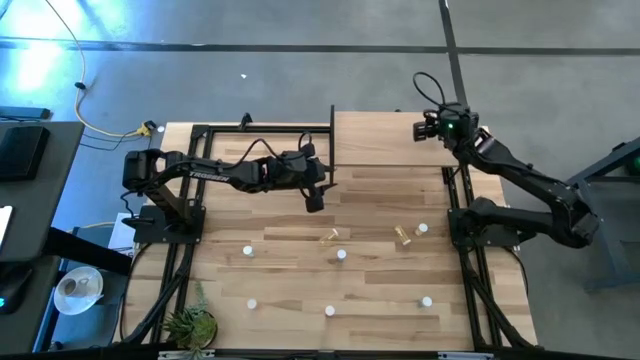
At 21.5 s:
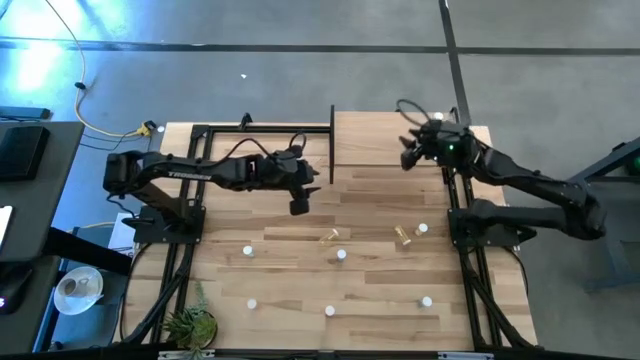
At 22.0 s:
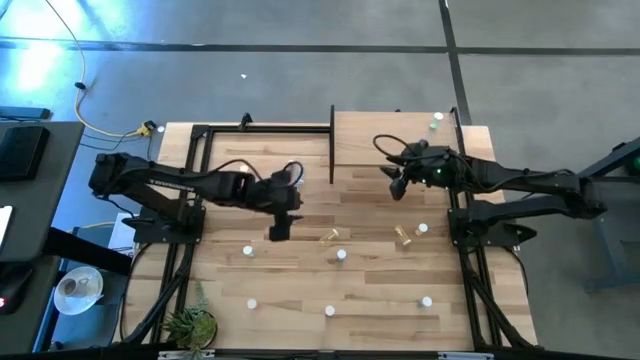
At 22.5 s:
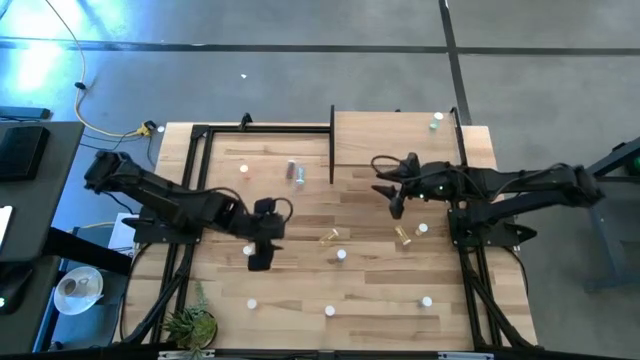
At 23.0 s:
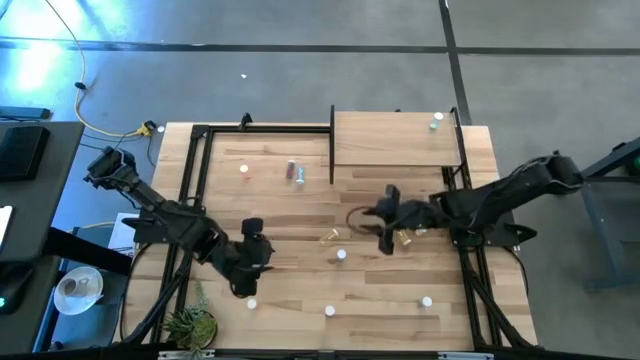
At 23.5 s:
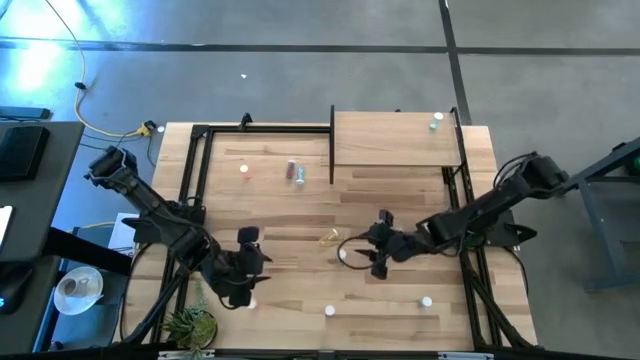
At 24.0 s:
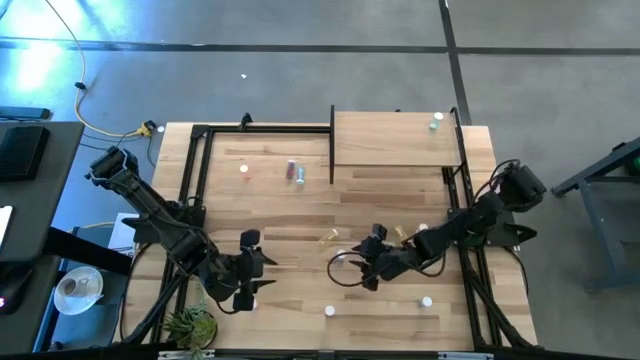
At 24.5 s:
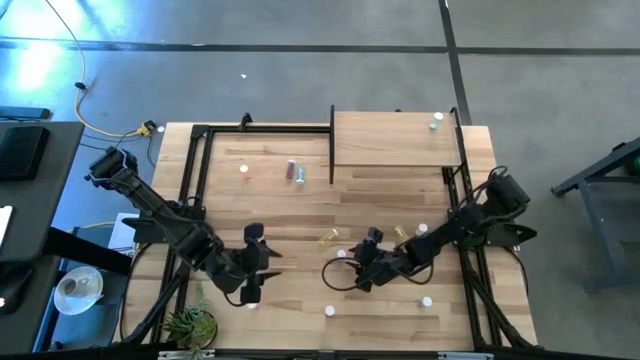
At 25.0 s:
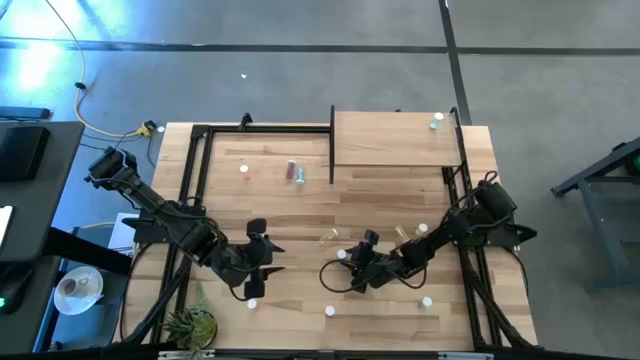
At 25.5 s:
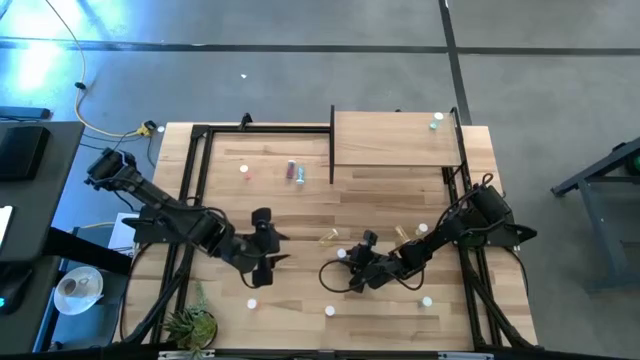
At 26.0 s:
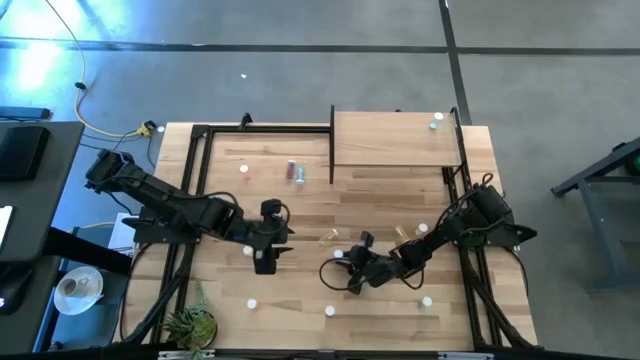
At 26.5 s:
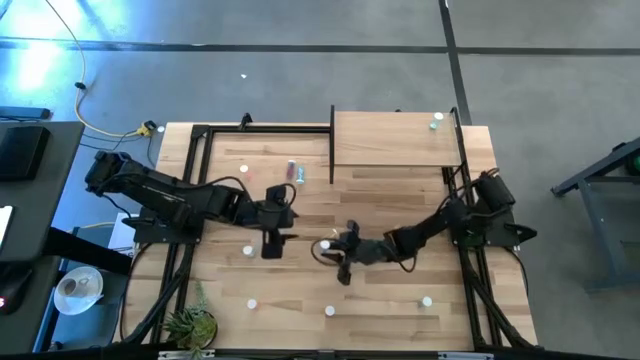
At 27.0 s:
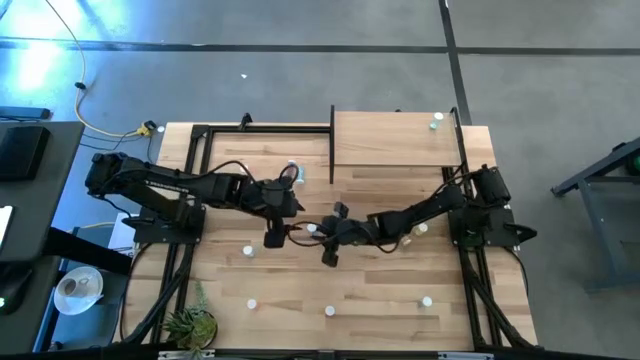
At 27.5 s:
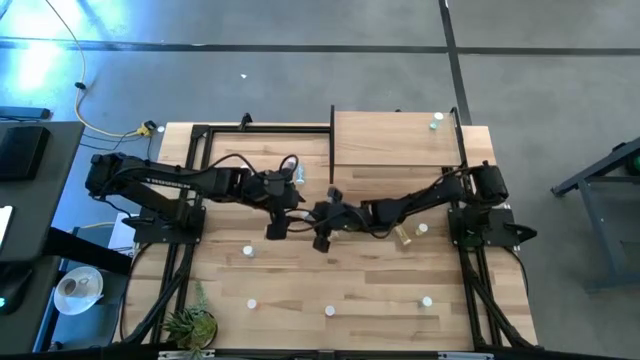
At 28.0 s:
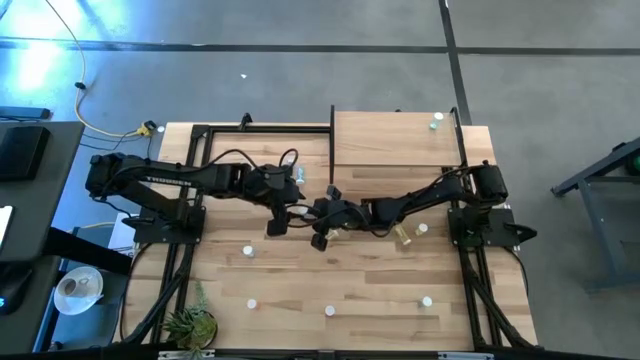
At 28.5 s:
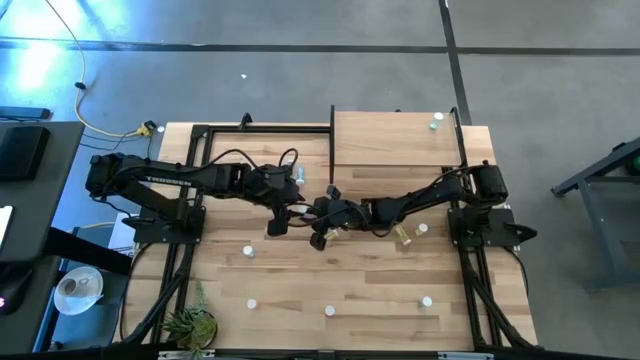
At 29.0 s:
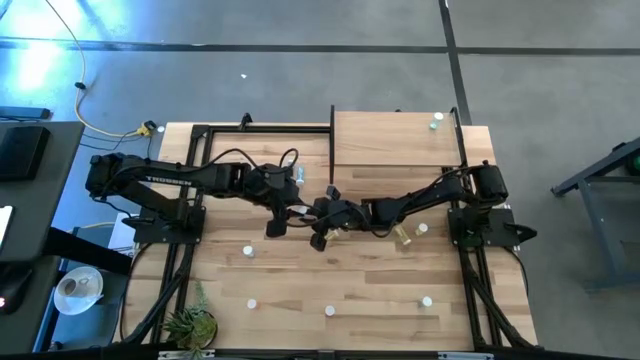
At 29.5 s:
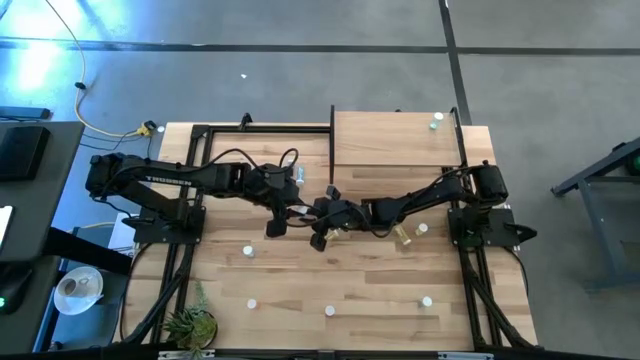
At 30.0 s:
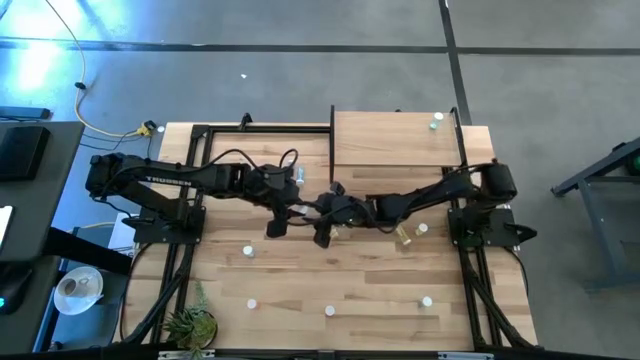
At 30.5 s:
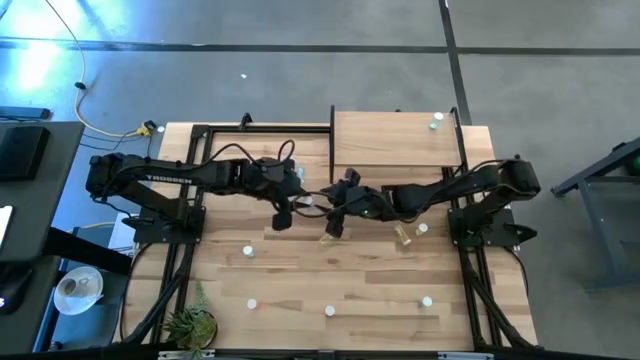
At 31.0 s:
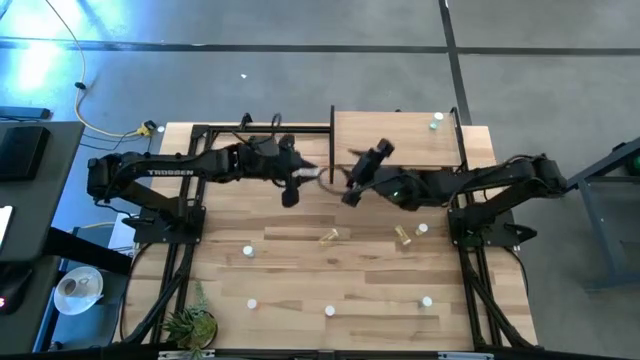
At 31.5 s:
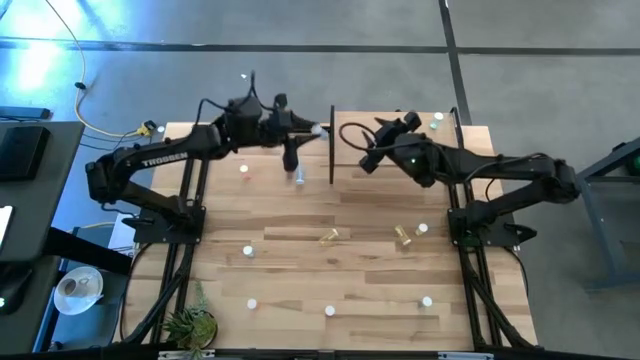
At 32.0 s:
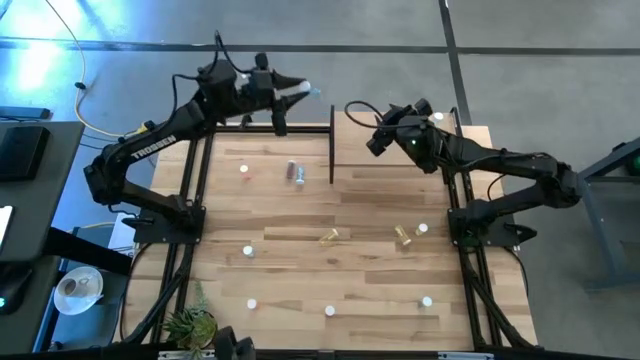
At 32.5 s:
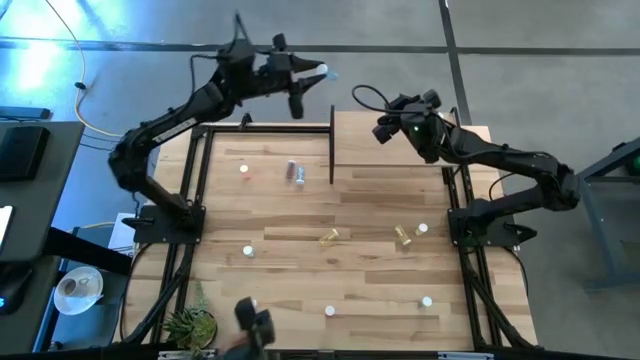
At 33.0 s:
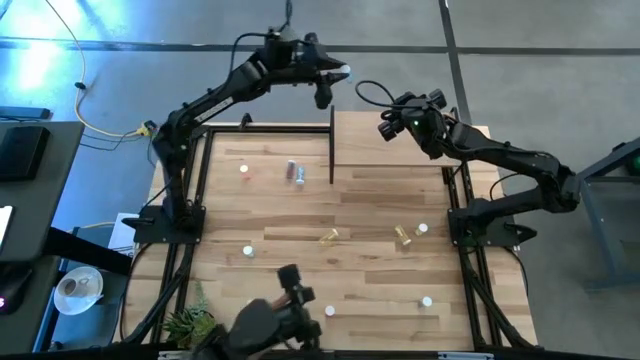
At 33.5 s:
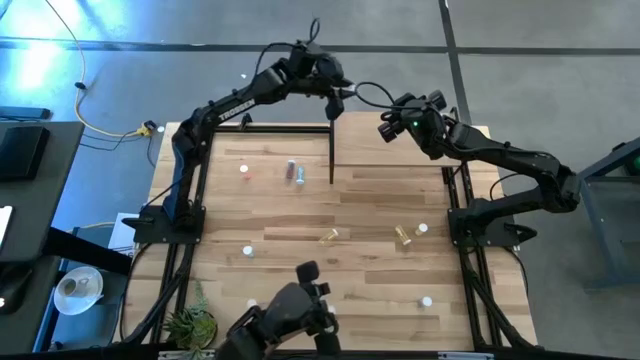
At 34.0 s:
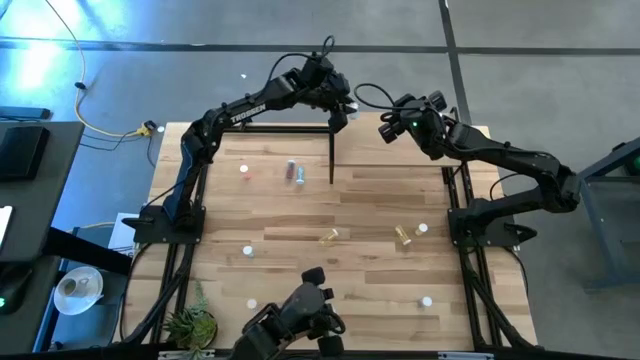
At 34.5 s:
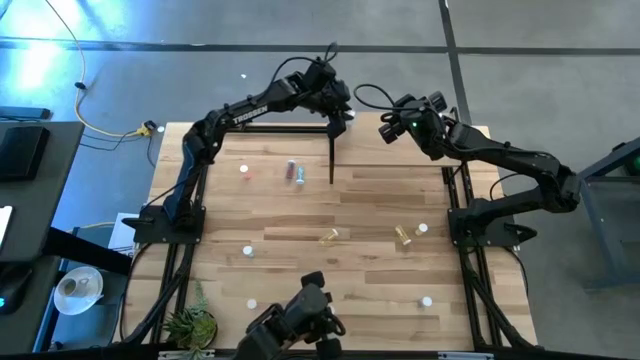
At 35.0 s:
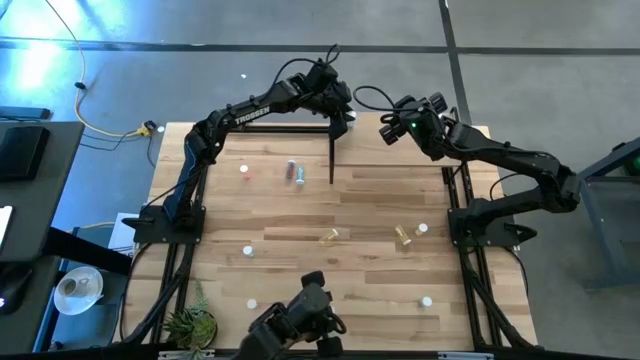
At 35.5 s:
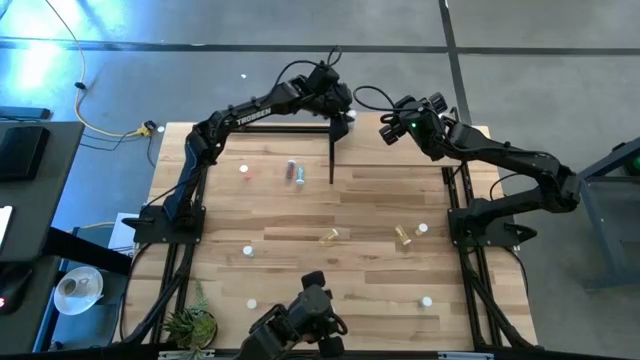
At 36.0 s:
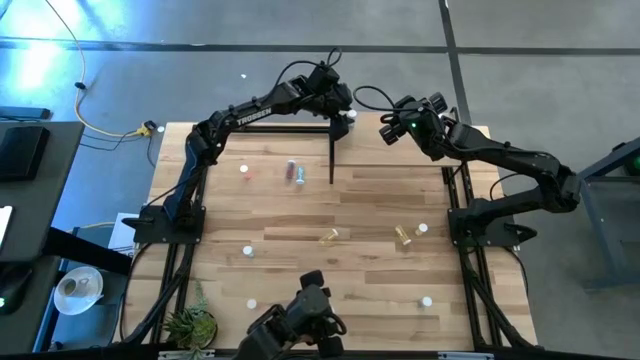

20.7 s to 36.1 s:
Task: Pick and place medicine bottles onto shelf by color
Put the bottom blue medicine bottle on the shelf

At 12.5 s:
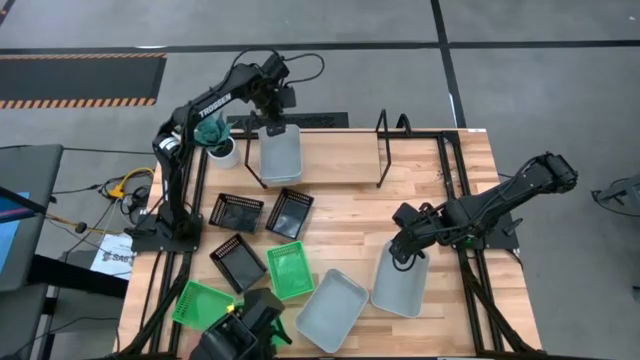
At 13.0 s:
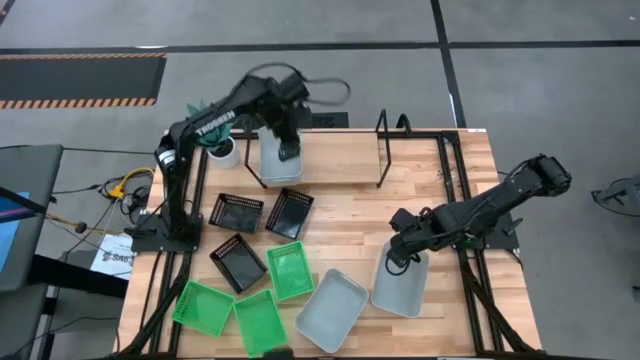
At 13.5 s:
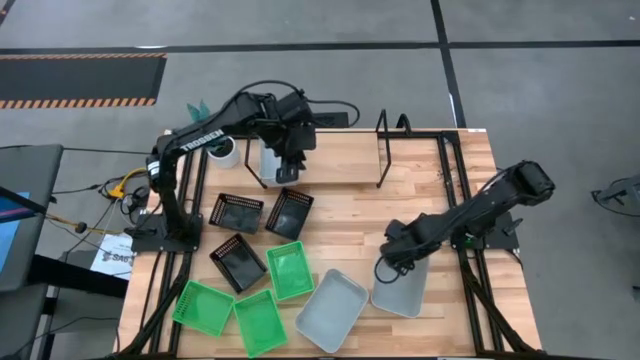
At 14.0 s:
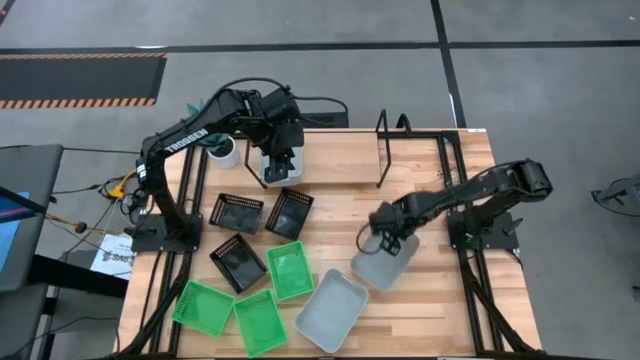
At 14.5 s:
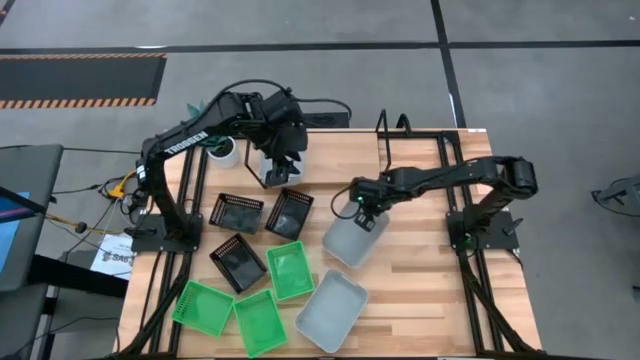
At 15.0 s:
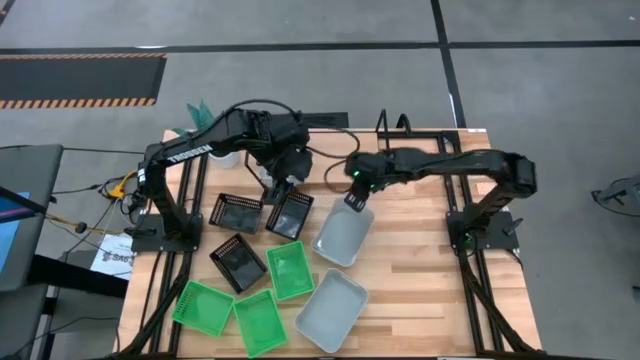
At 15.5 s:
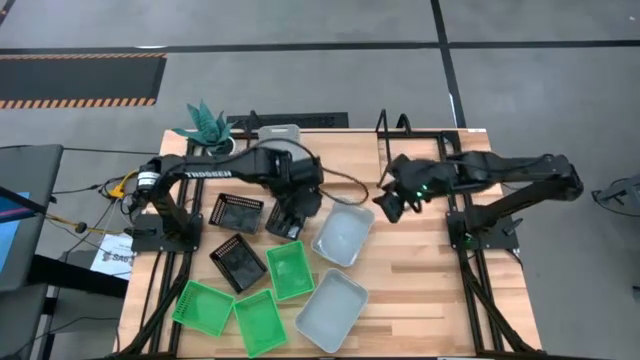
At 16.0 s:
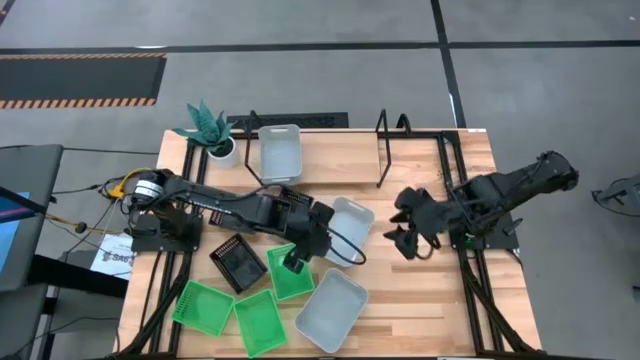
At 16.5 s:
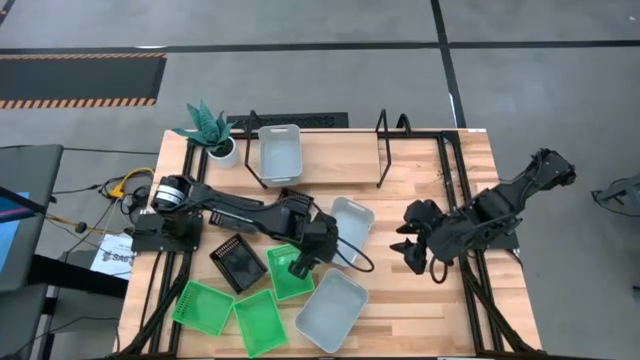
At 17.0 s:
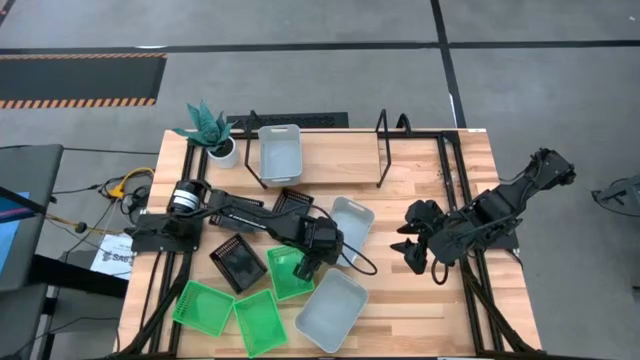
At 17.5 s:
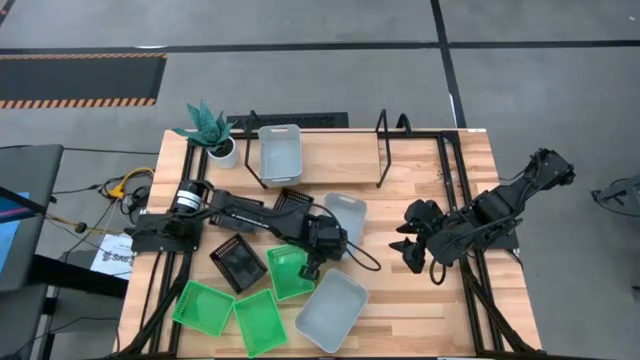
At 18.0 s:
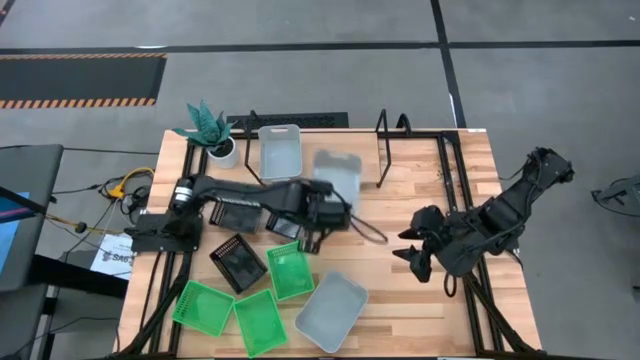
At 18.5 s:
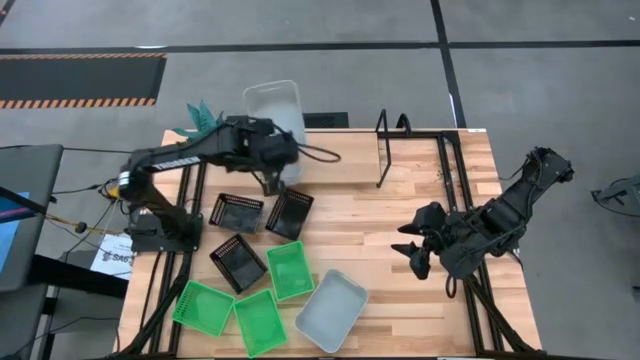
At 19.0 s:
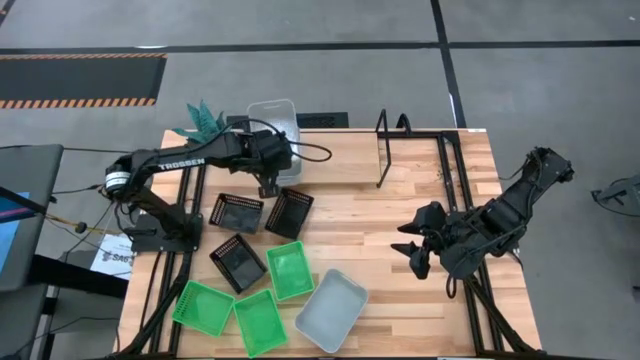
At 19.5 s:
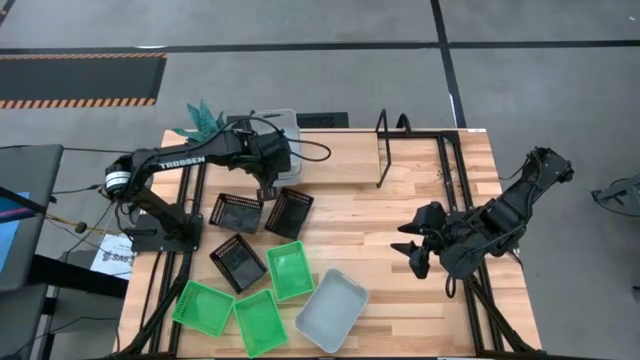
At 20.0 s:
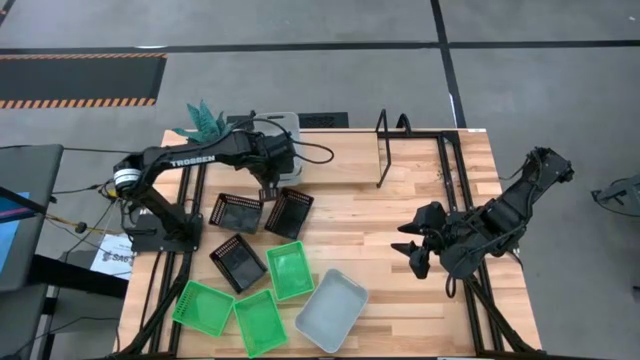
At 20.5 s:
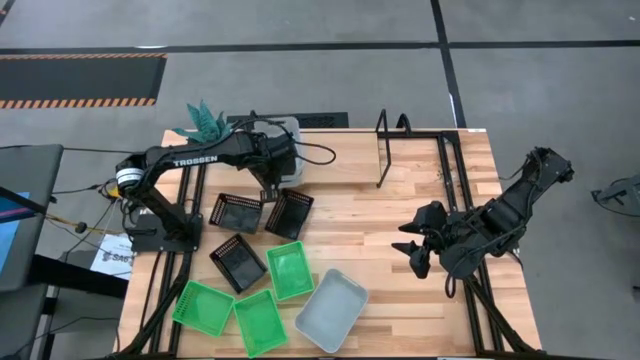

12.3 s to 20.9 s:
Task: Stack baskets on shelf by color
Stack the right gray bin on top of the gray bin on the shelf
